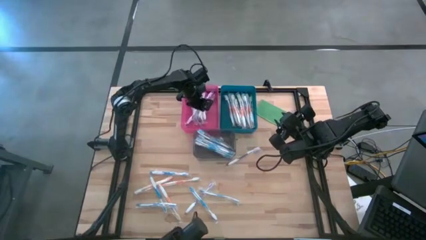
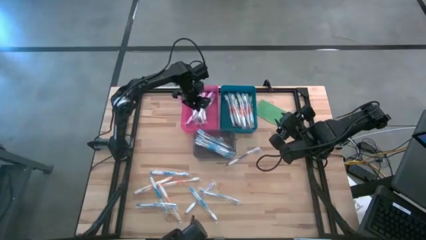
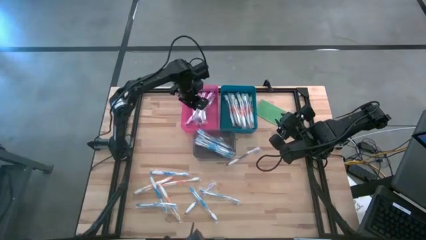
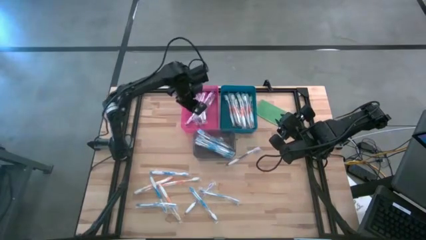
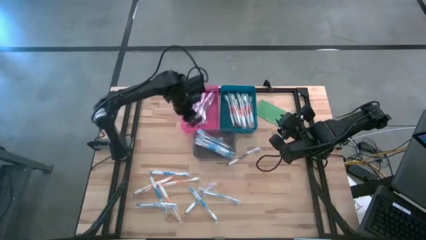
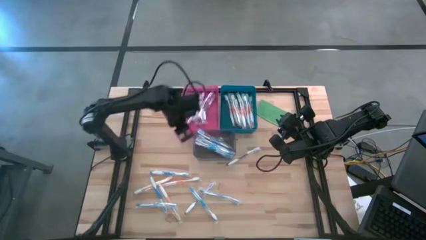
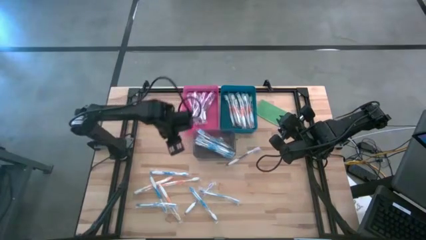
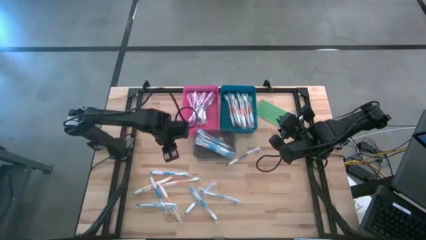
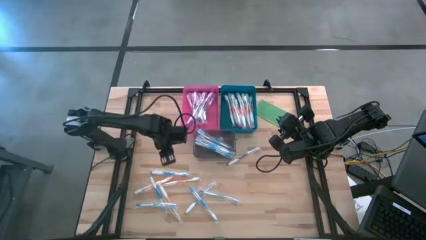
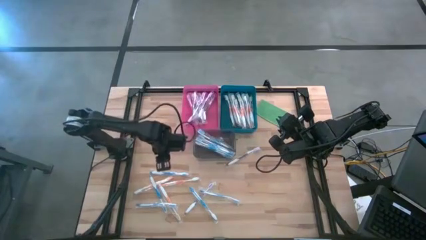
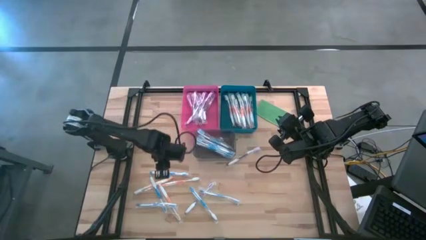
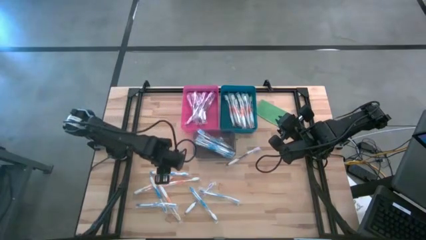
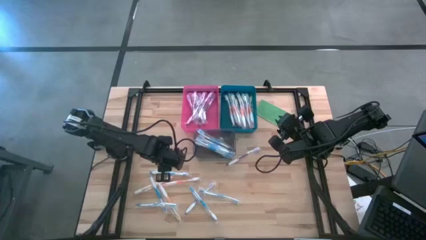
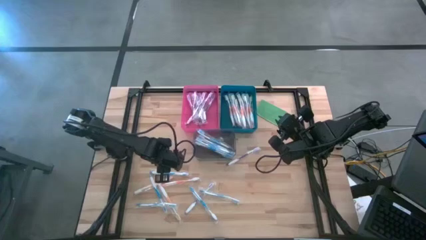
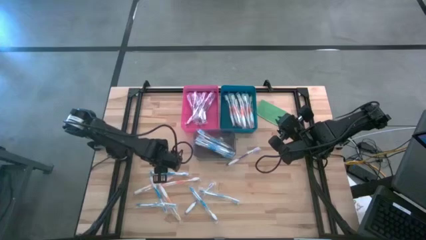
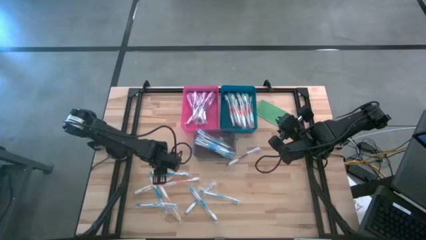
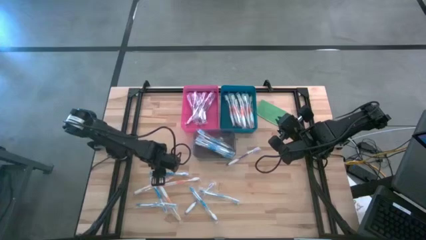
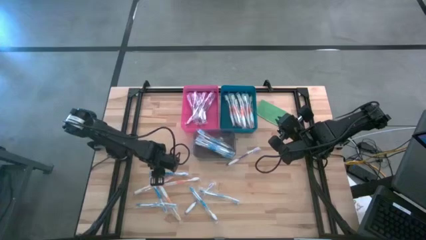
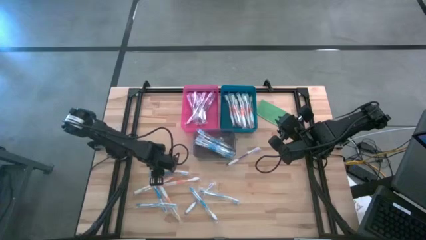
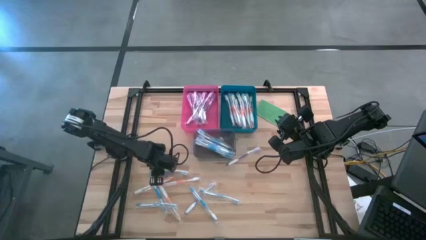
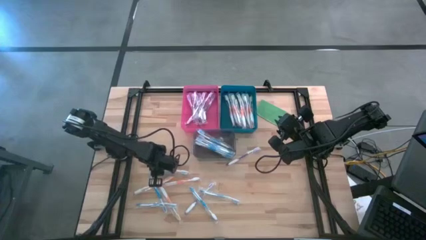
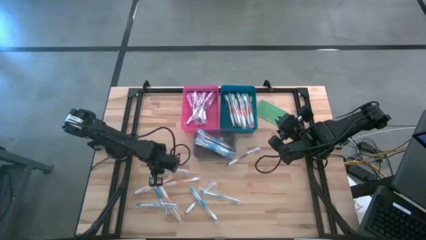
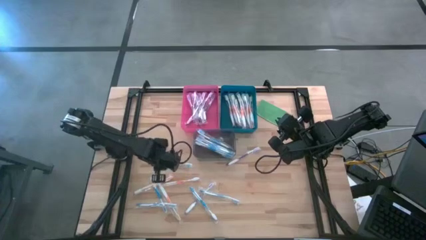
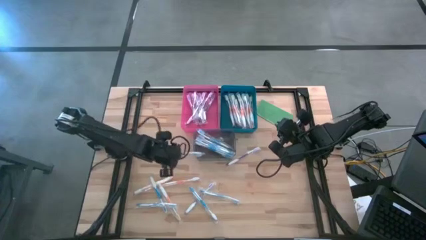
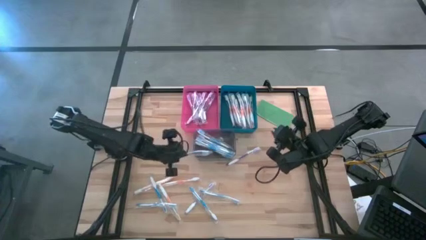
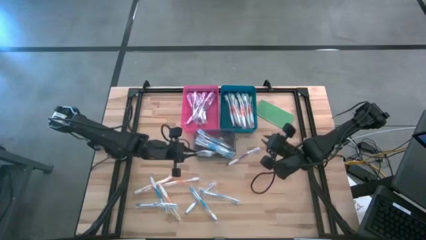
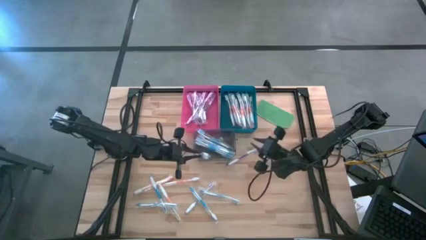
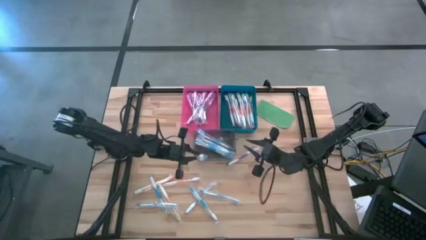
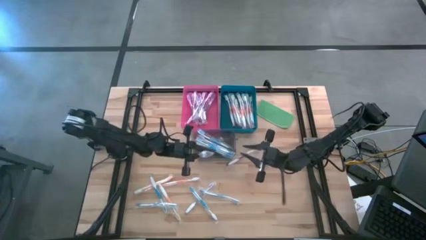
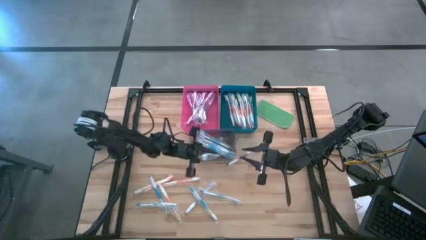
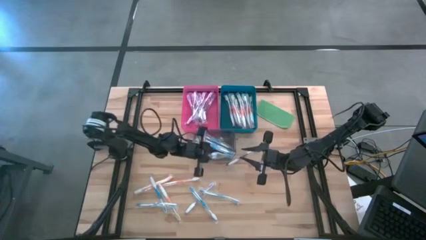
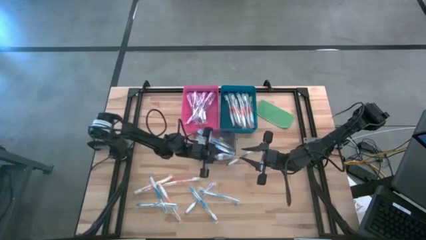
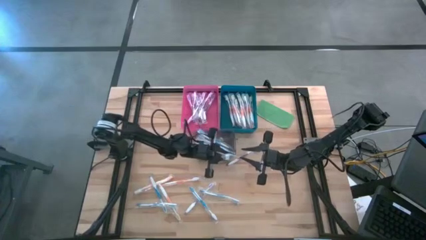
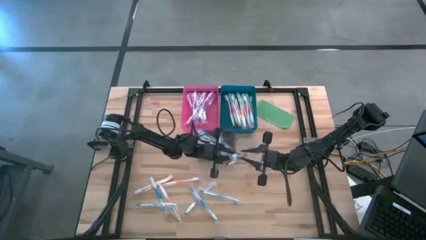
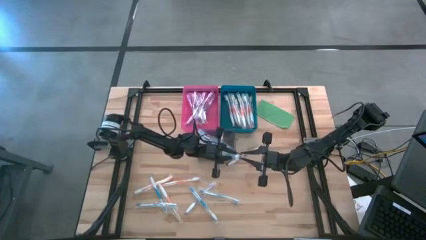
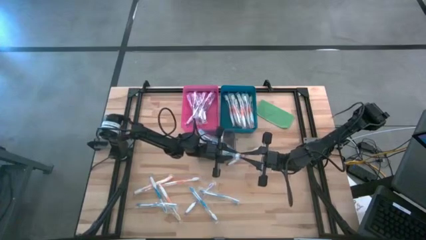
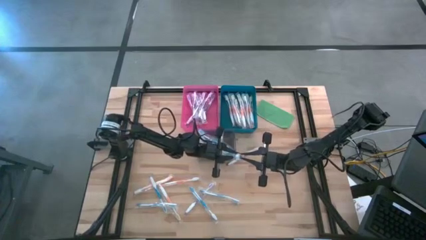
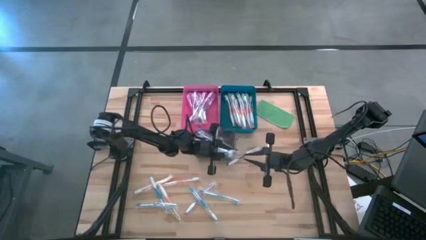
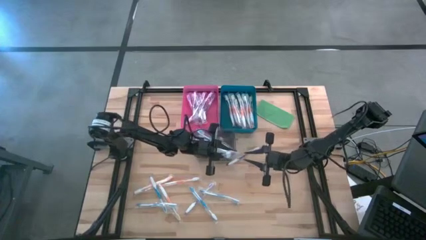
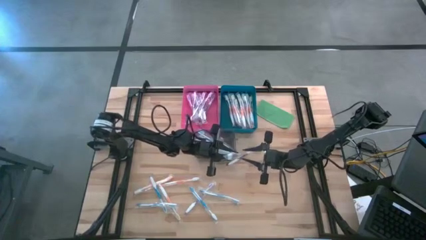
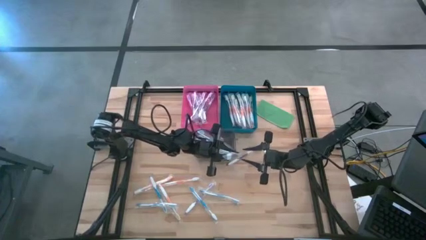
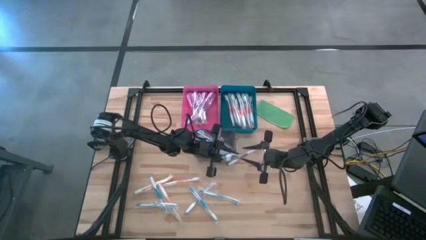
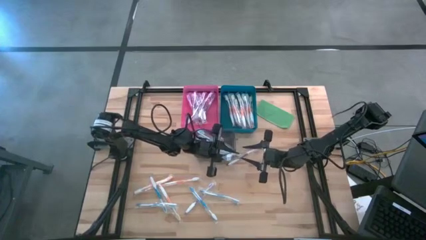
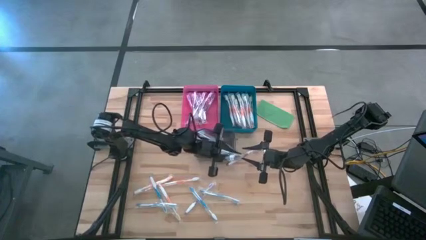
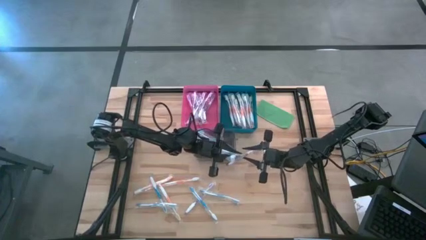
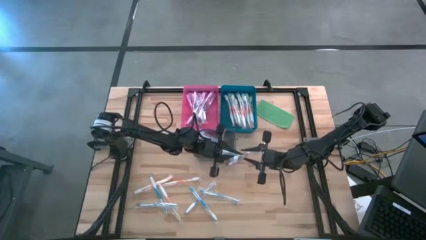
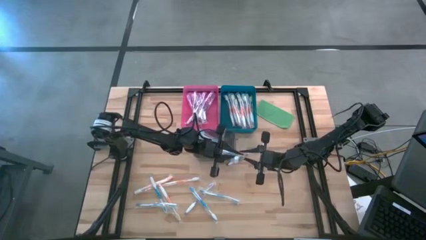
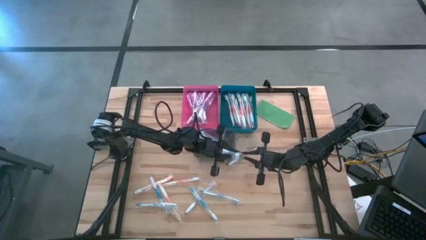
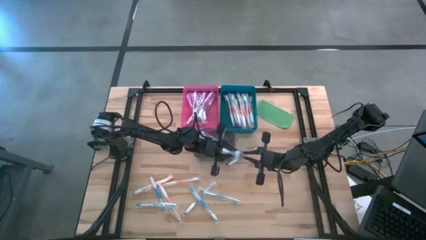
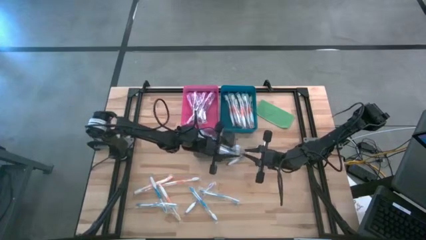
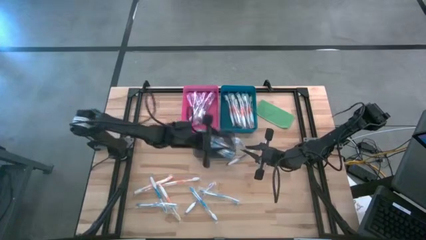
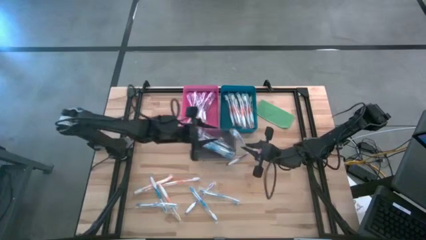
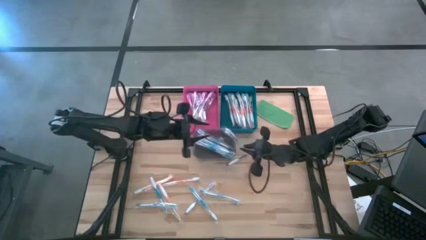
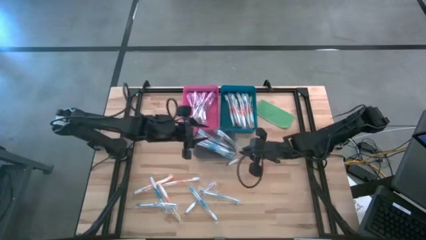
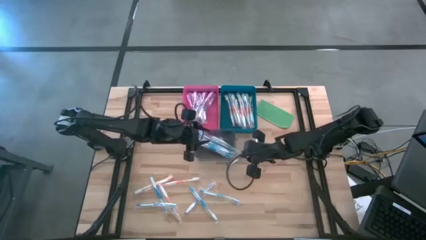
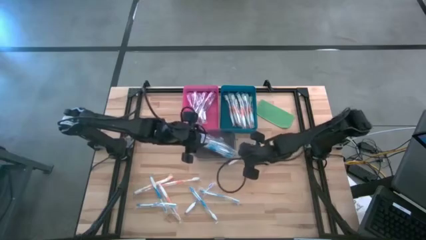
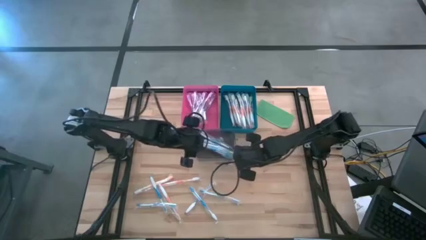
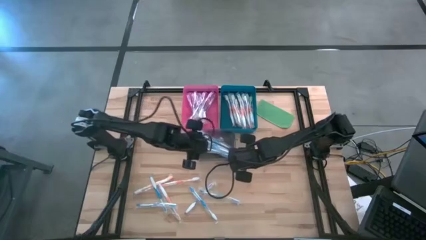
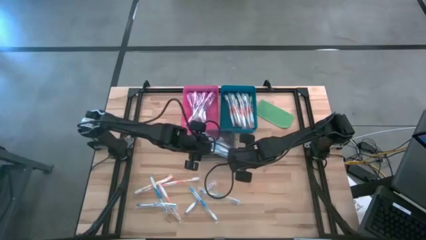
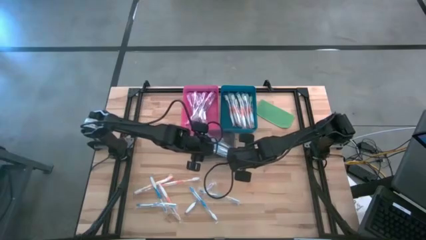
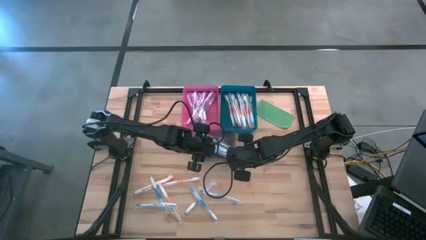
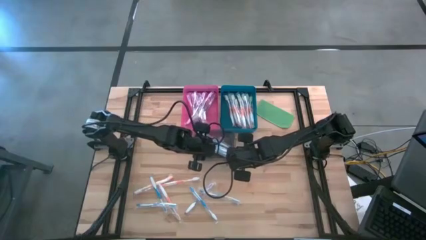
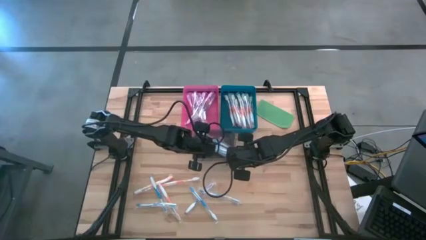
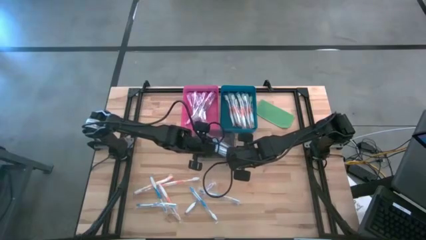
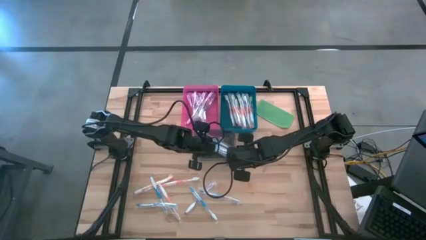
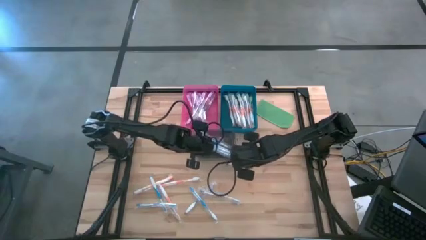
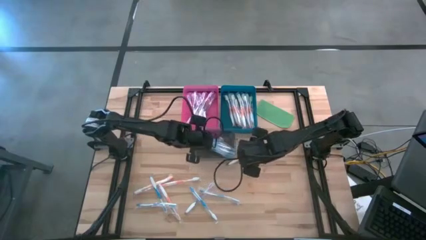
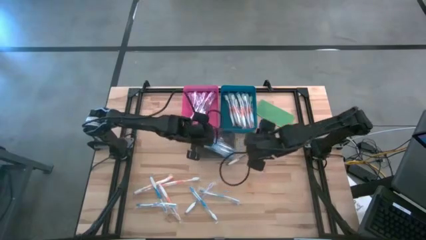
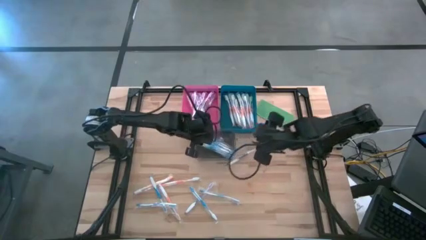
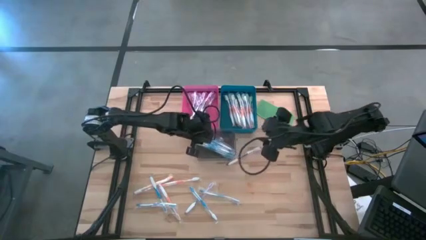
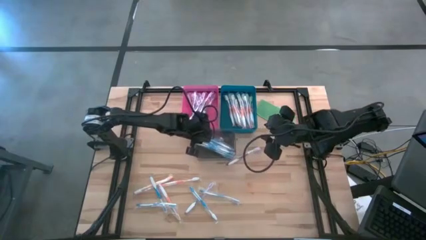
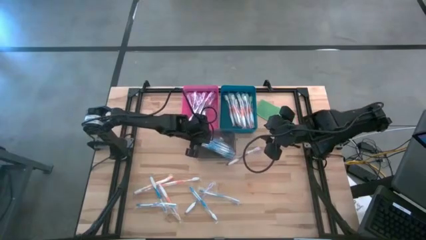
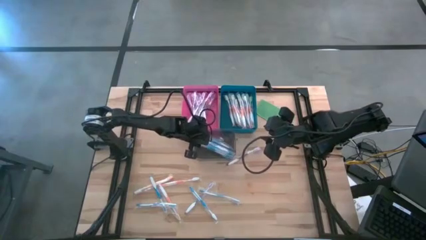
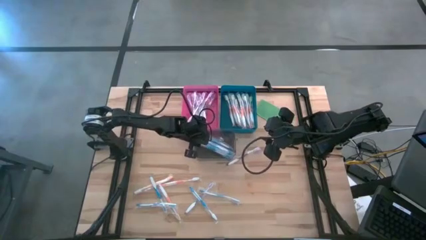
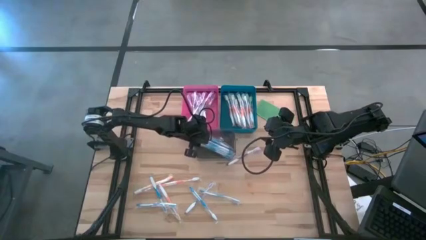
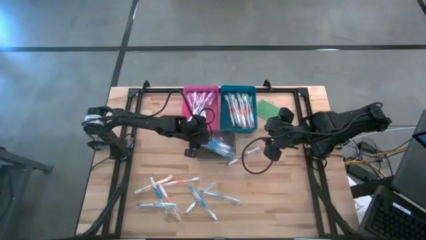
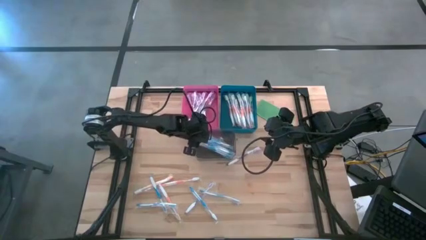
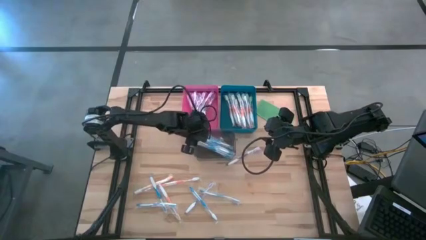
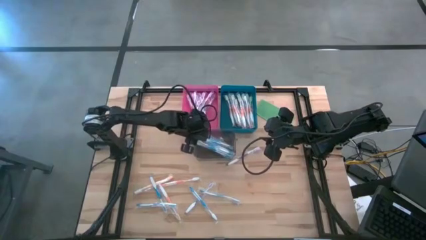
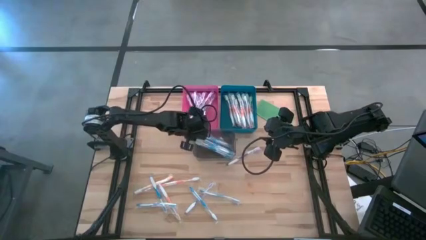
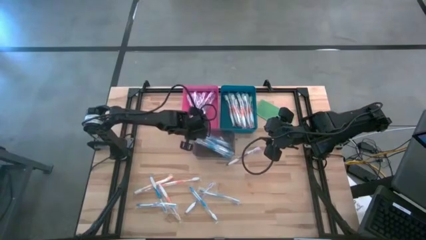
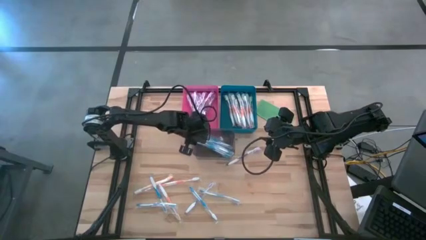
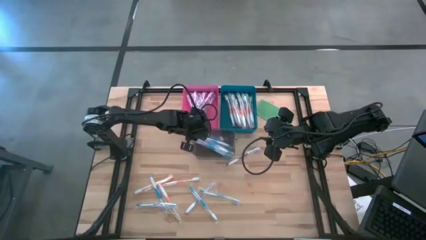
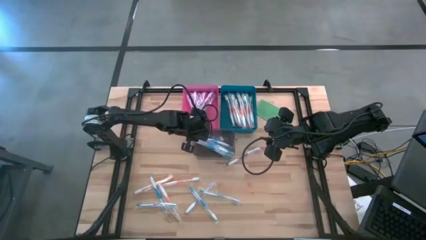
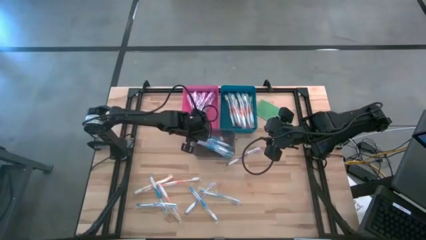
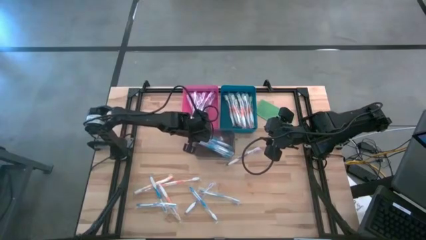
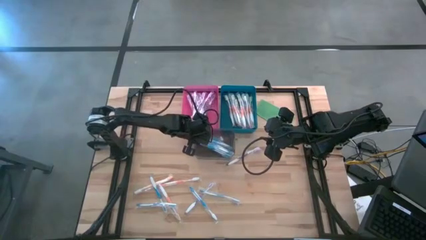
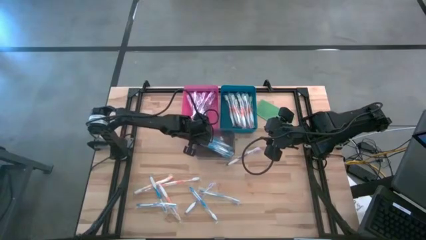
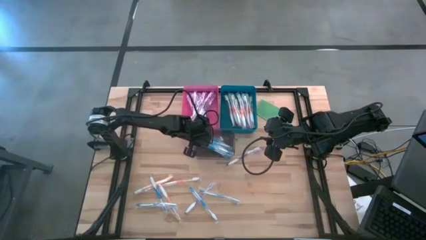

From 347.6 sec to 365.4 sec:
Task: Pick & Place Toothbrushes
Put the blue toothbrush into the transparent gray bin
